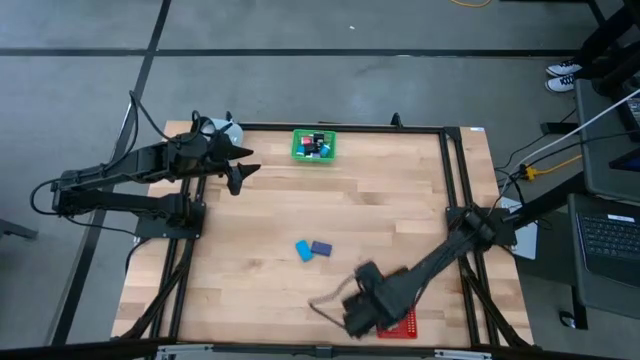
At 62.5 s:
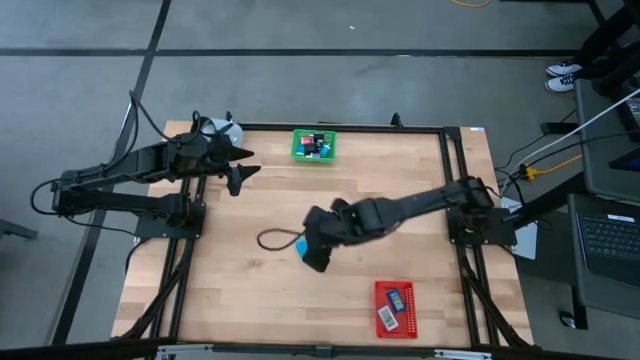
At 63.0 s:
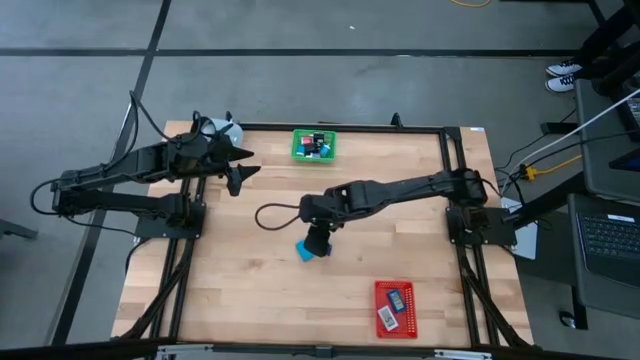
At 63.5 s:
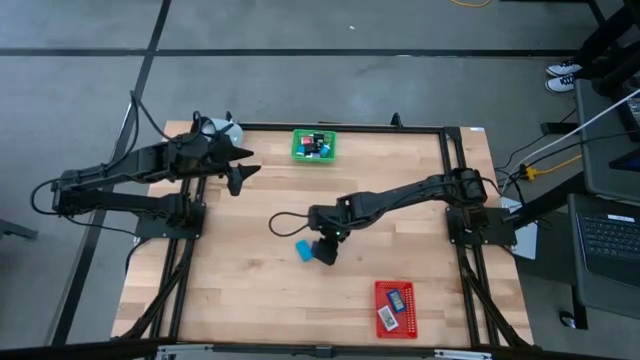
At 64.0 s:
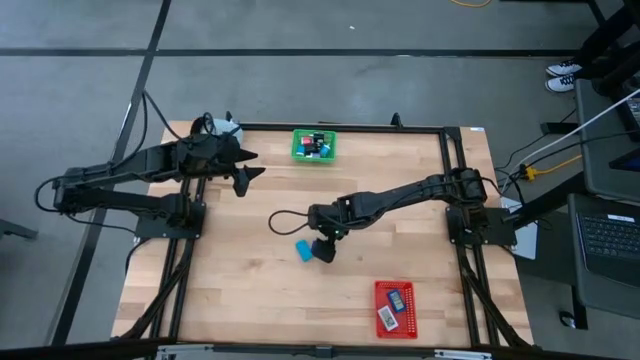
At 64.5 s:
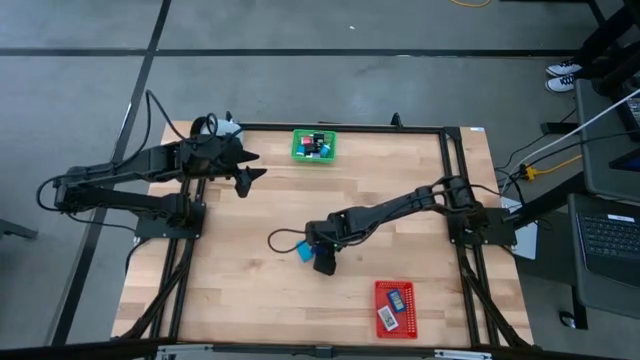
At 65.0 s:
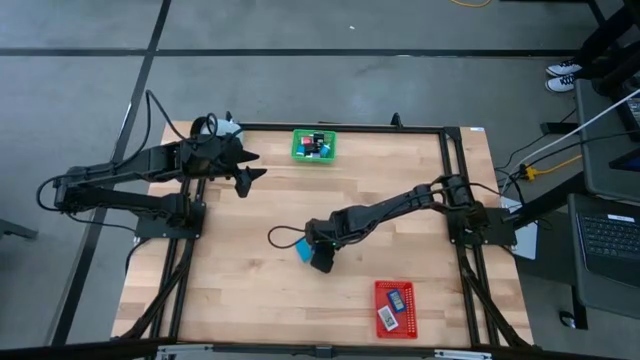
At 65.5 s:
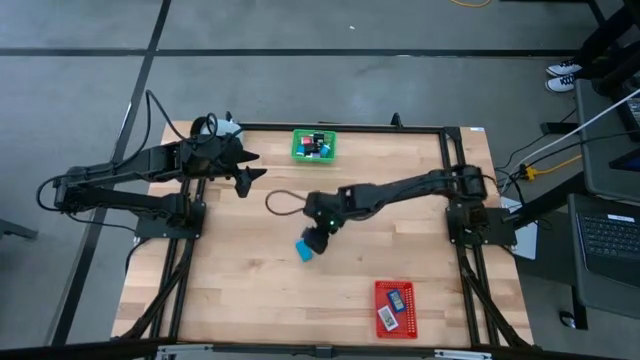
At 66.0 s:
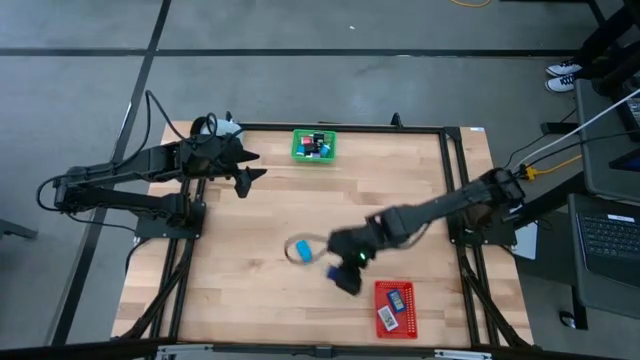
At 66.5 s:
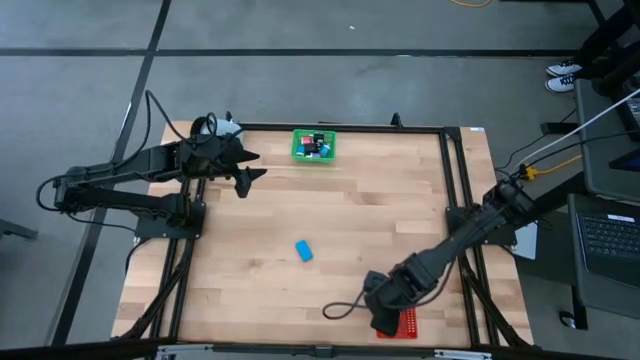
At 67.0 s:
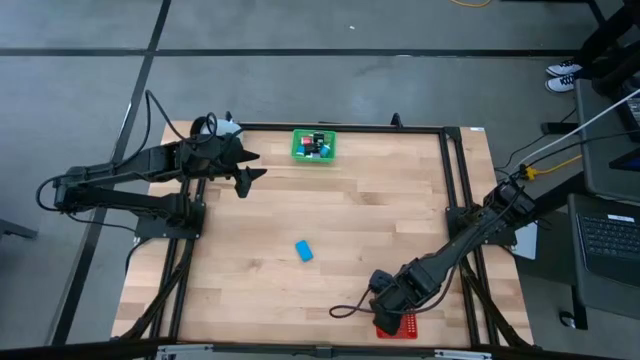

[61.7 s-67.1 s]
Task: Pick & Place Office items
Put the dark blue digital timer into the red bin

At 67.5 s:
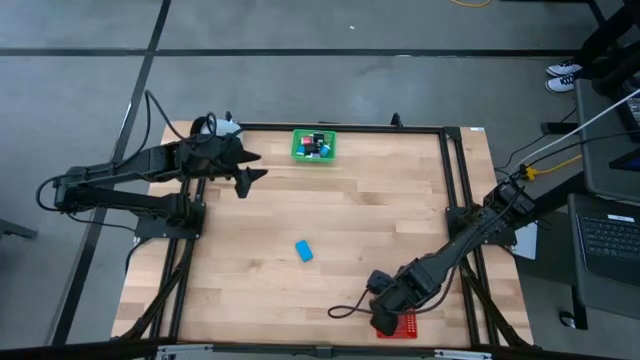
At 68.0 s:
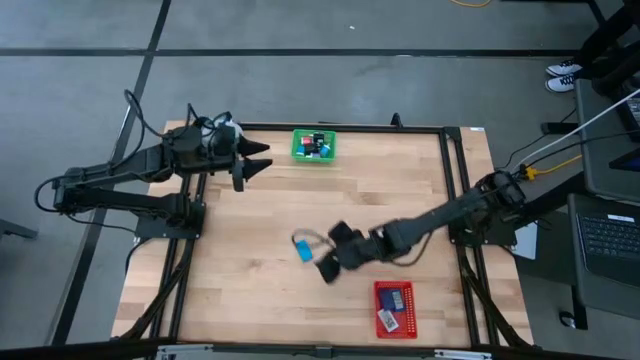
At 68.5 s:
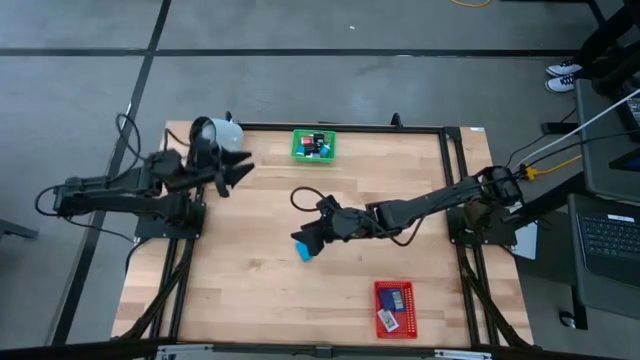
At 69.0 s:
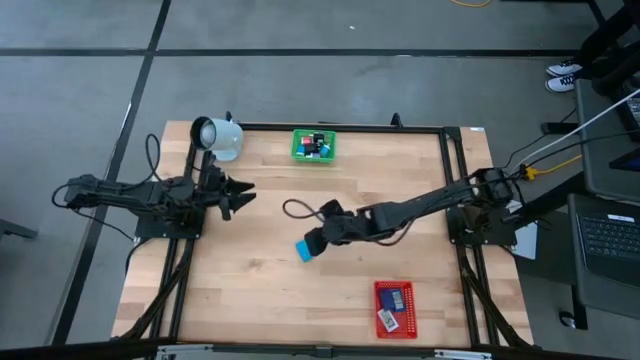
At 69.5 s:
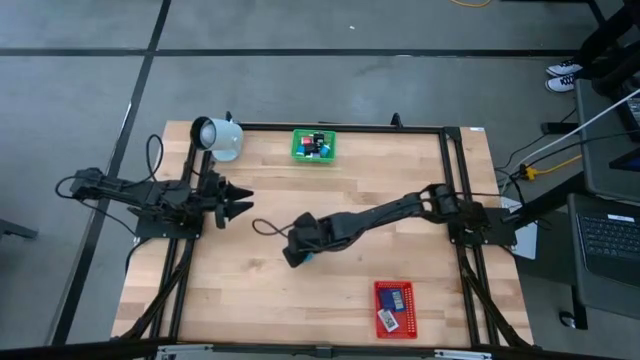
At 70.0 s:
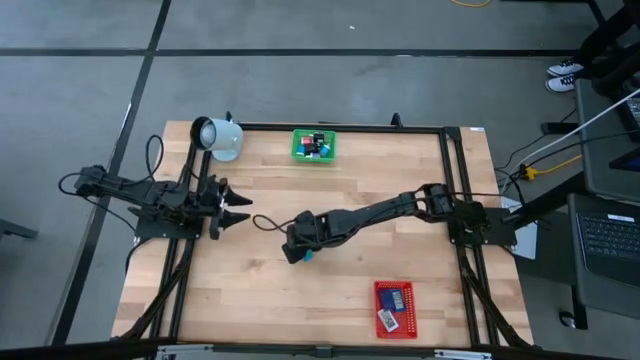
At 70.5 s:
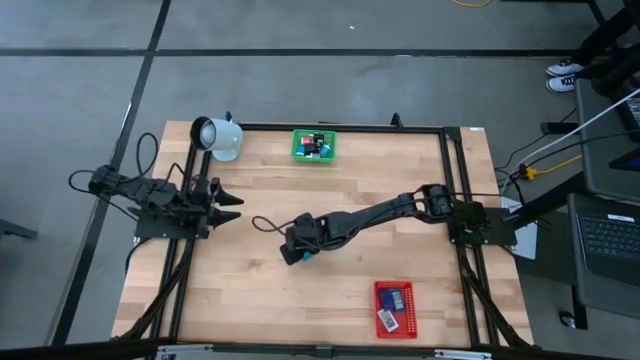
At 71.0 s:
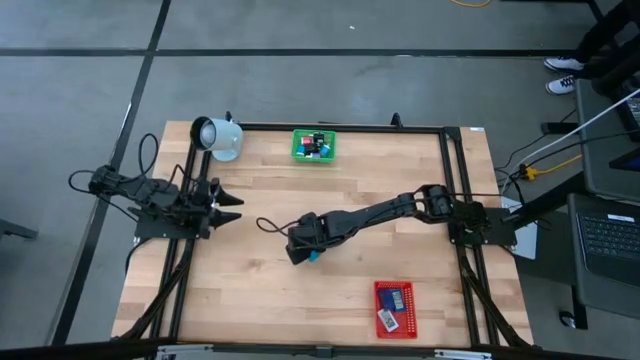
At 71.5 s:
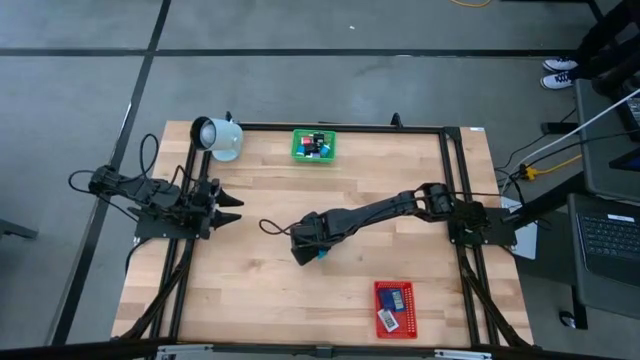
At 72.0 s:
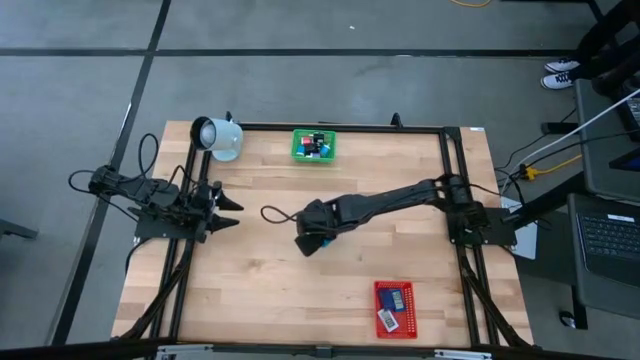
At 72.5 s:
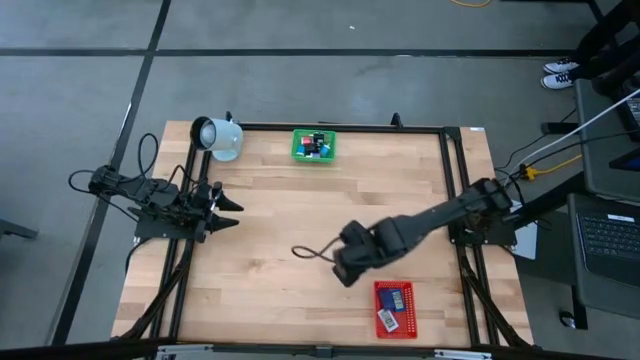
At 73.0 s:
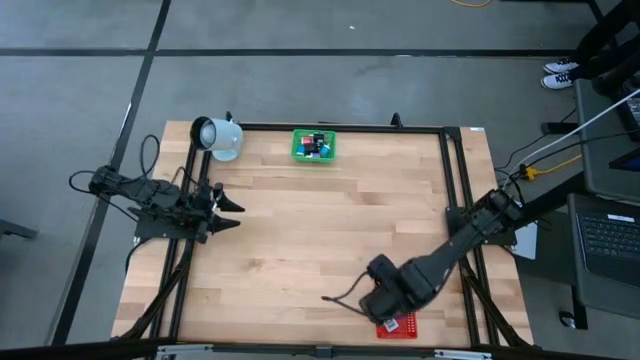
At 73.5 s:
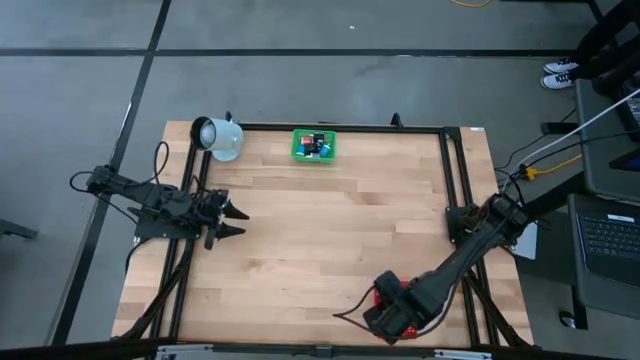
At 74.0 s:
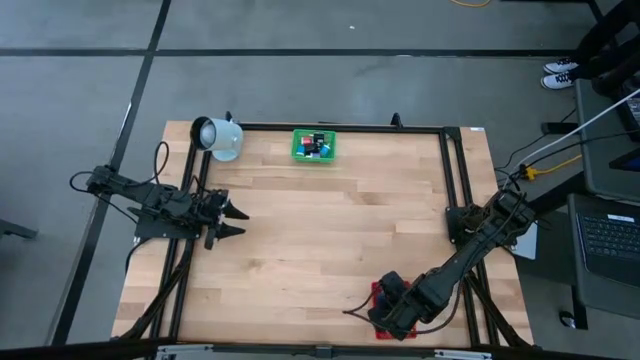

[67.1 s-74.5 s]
Put the light blue digital timer into the red bin

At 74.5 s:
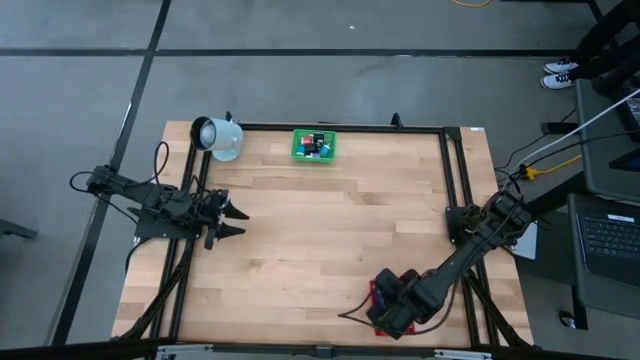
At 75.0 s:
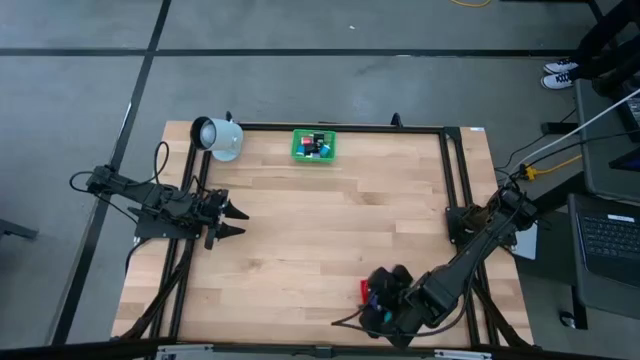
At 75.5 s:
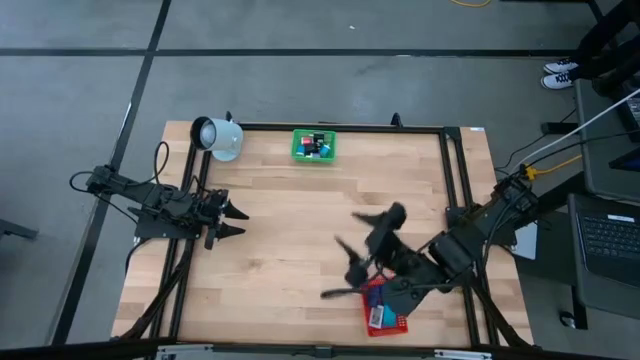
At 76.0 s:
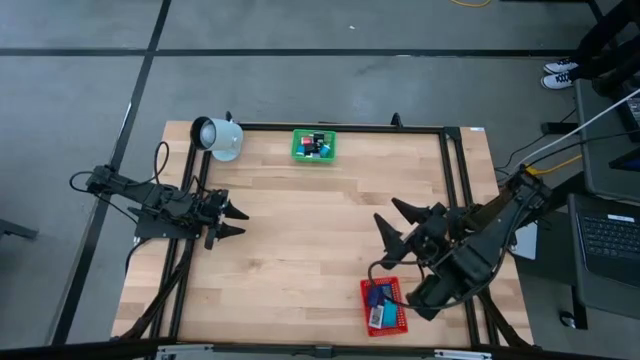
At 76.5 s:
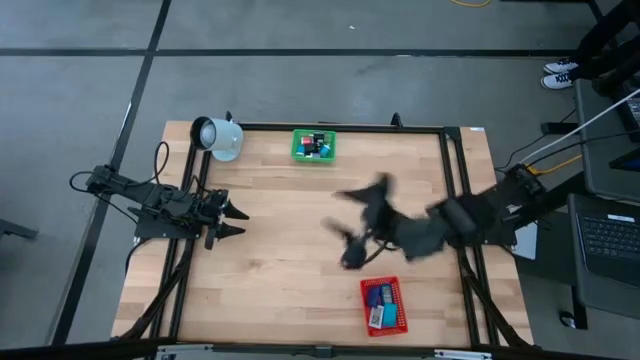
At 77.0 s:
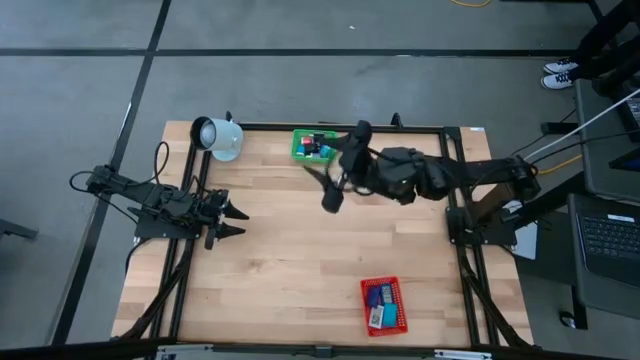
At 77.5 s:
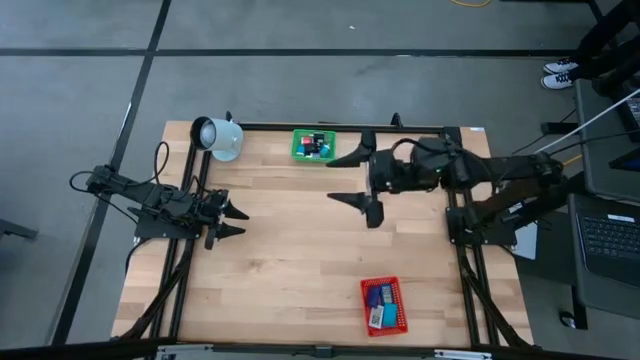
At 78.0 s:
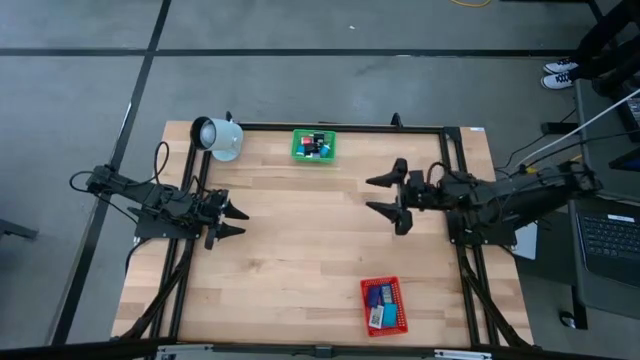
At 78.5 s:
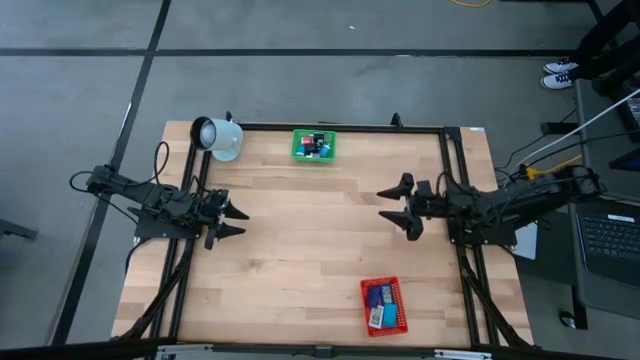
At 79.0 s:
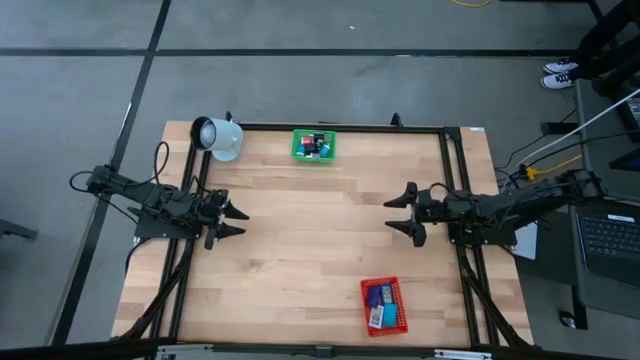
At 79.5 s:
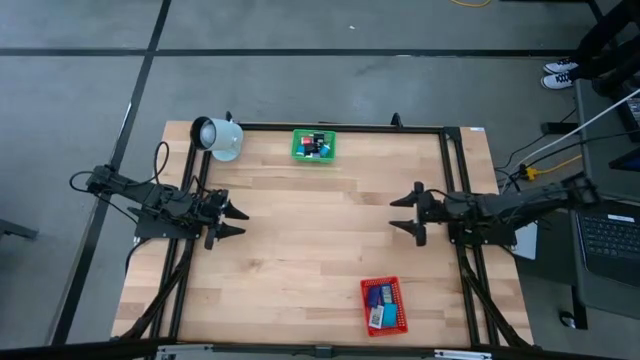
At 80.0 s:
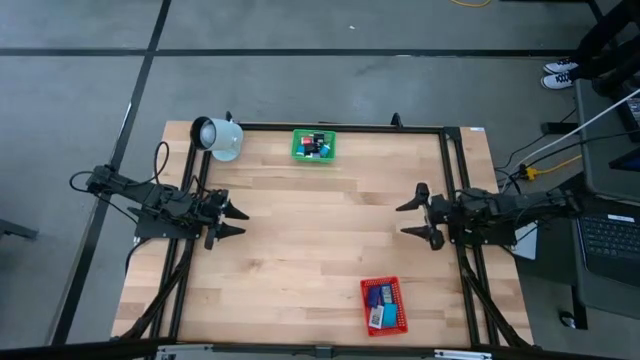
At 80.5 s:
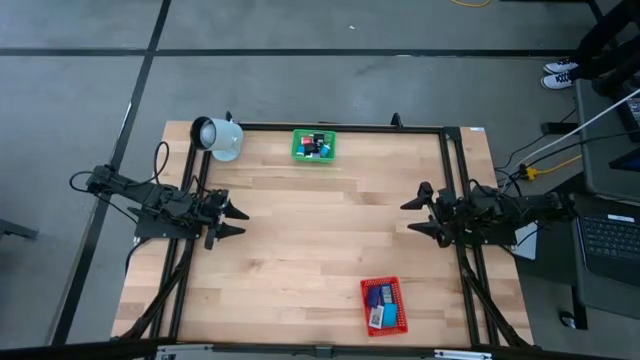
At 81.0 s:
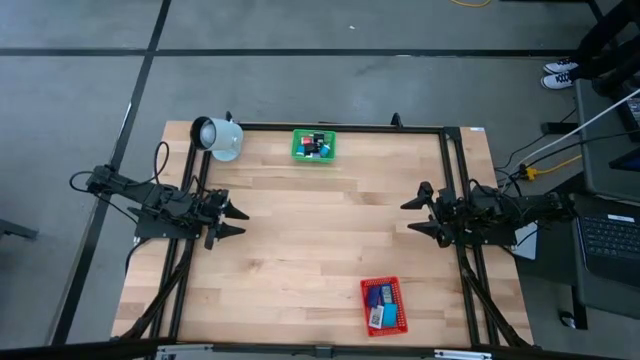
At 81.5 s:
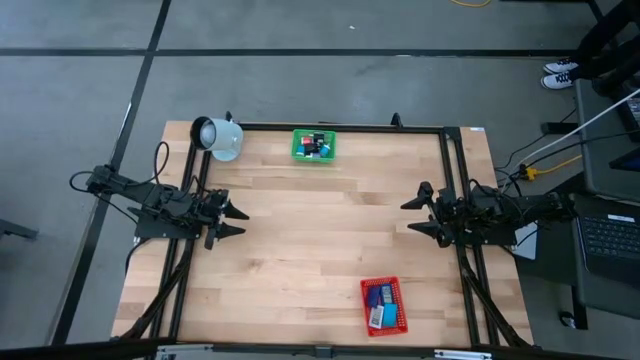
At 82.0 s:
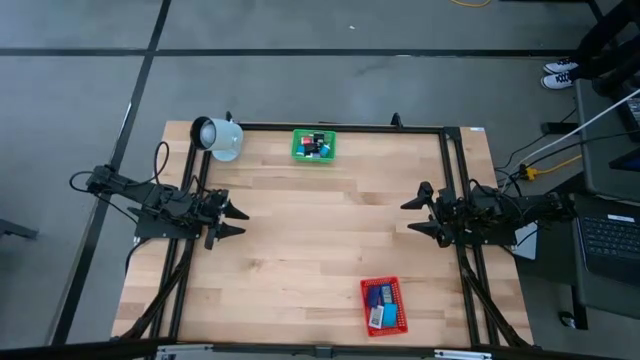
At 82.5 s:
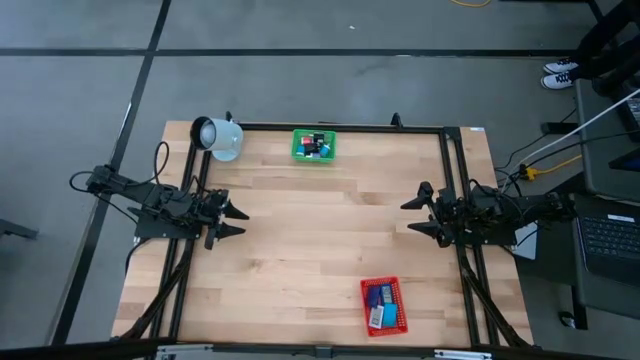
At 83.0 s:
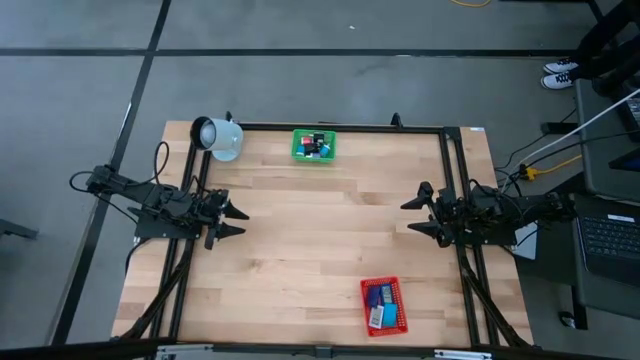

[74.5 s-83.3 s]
Return to Home Position
